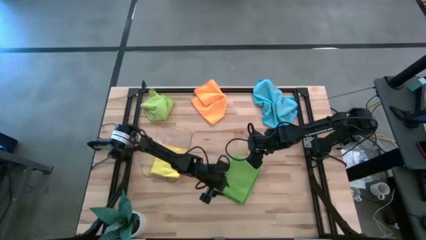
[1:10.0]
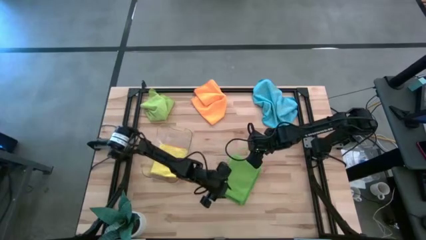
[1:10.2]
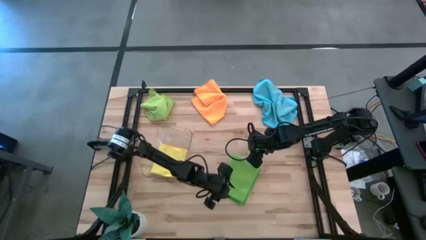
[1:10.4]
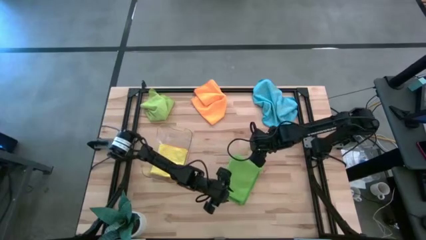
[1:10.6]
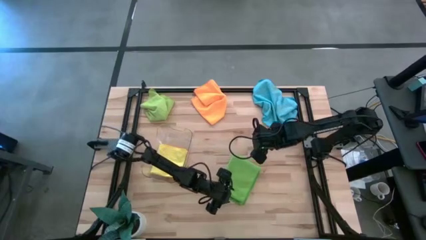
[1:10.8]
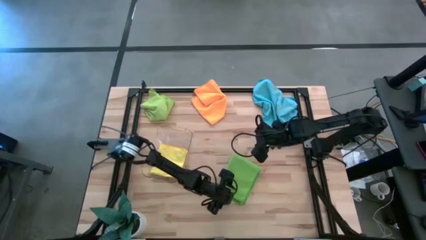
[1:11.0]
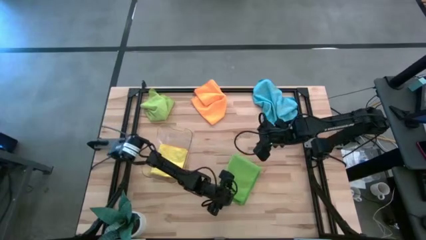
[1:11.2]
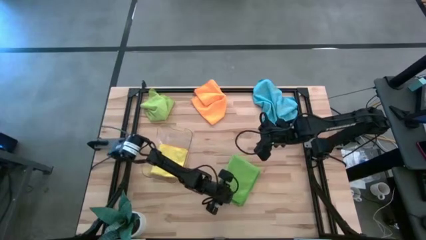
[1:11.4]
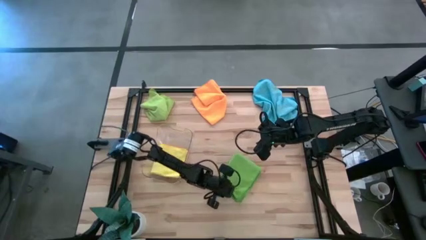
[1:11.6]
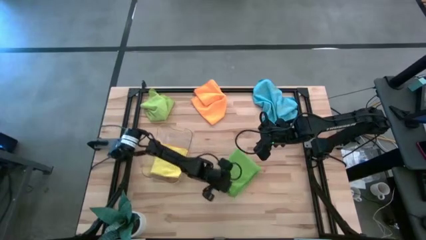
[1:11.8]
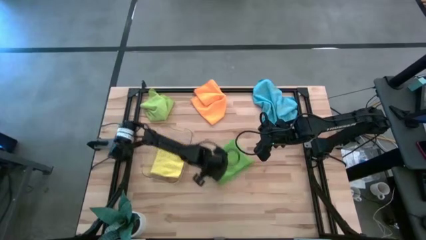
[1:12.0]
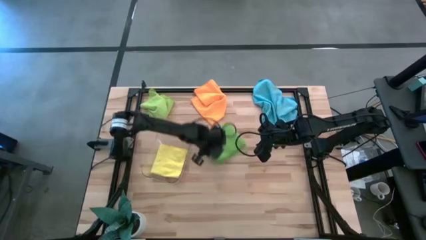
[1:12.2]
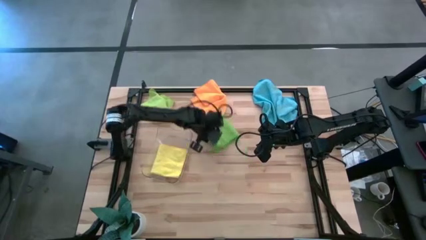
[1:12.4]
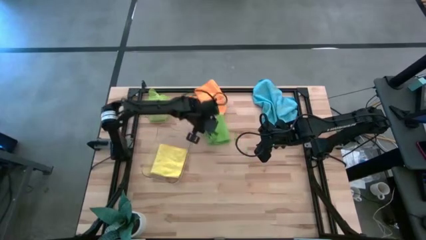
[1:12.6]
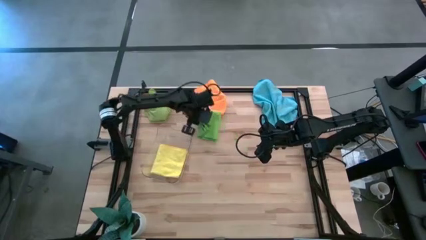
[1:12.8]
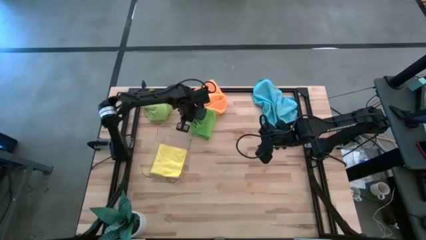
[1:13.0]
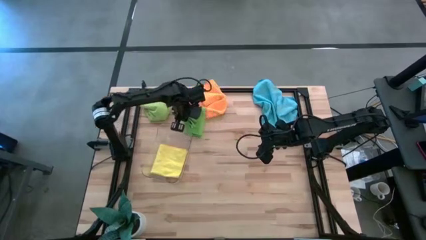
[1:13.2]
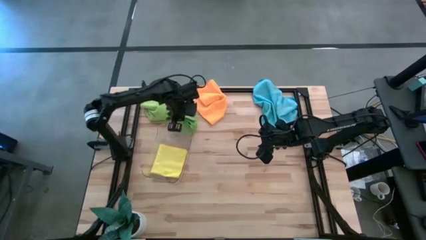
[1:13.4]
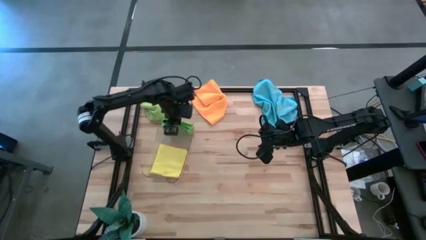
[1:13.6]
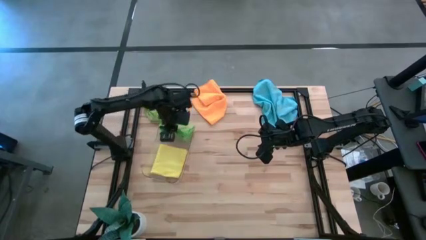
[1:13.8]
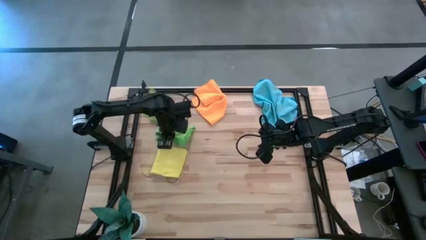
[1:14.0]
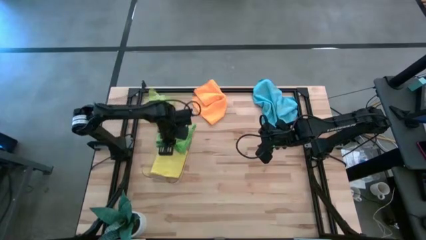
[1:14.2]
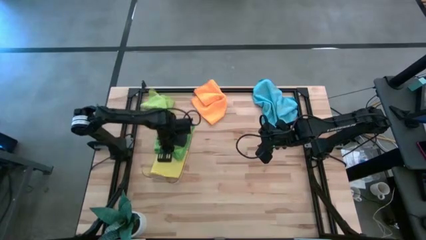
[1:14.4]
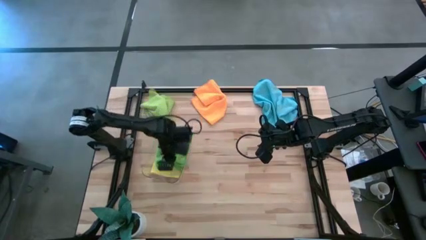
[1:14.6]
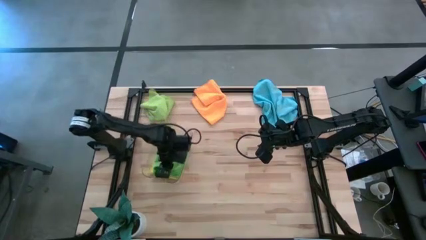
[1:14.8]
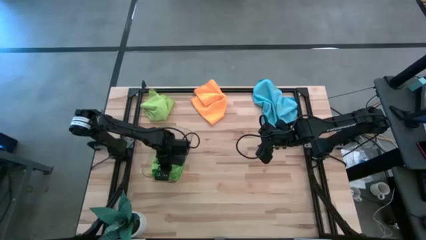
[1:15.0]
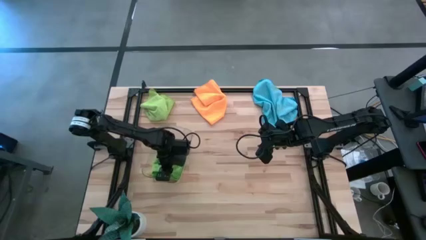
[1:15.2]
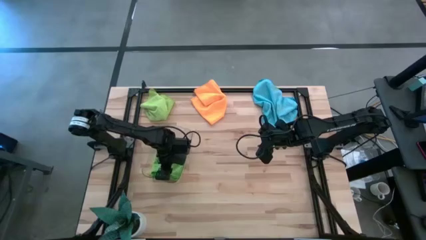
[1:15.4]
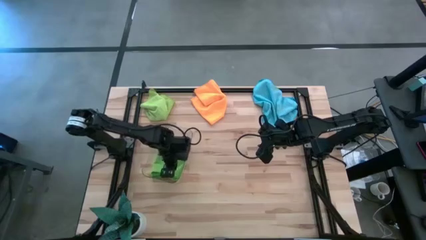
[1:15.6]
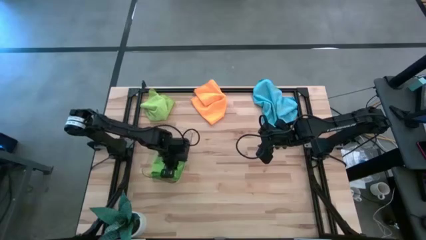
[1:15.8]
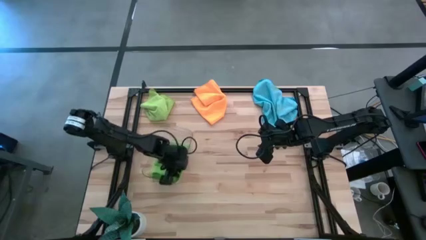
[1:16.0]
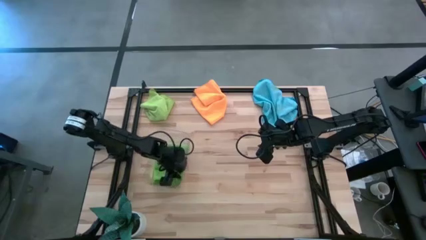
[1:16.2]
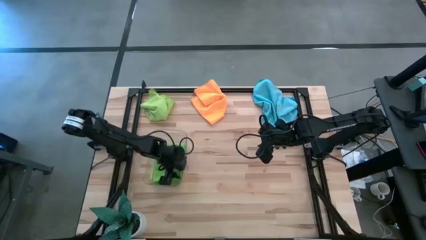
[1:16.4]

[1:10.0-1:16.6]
Task: Fold microfiber towels
Put the folded green microfiber towel into the transparent bin

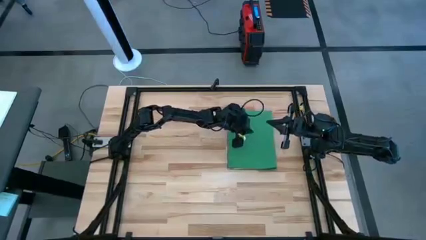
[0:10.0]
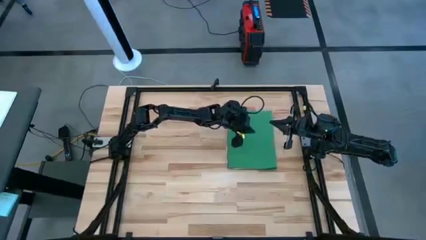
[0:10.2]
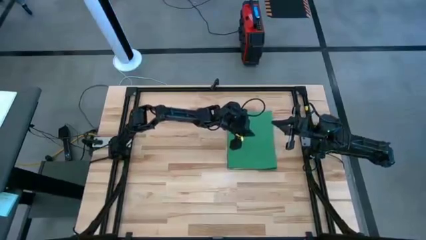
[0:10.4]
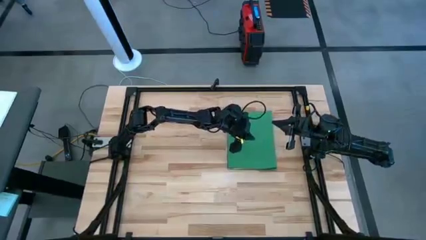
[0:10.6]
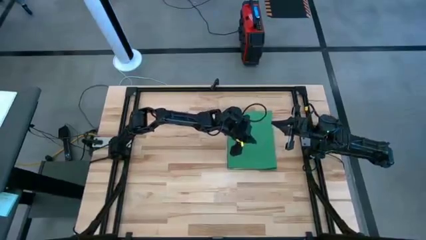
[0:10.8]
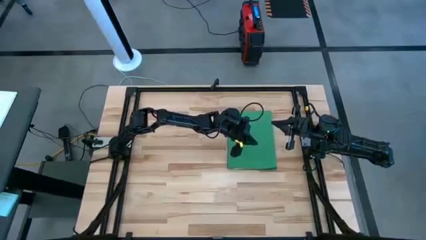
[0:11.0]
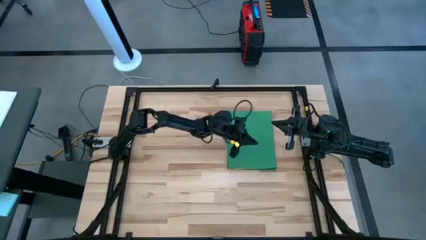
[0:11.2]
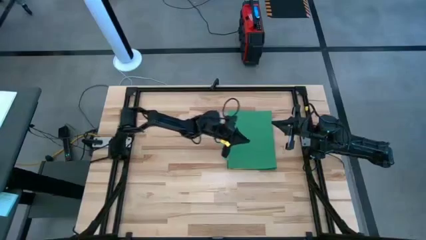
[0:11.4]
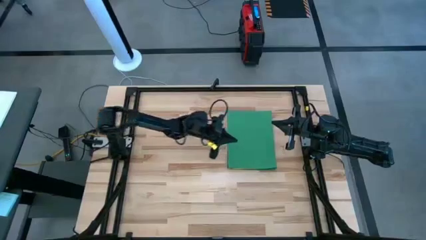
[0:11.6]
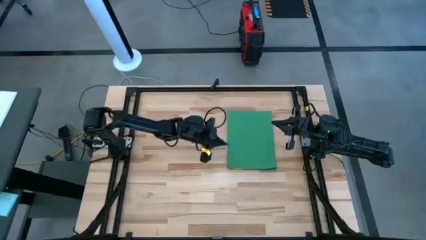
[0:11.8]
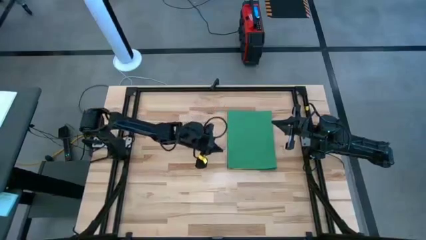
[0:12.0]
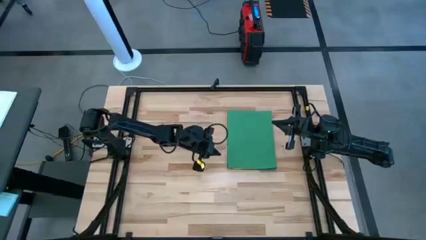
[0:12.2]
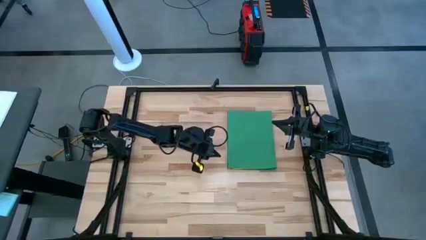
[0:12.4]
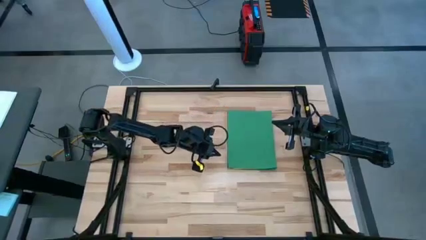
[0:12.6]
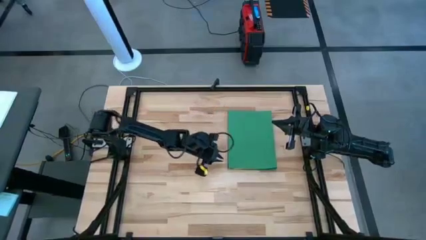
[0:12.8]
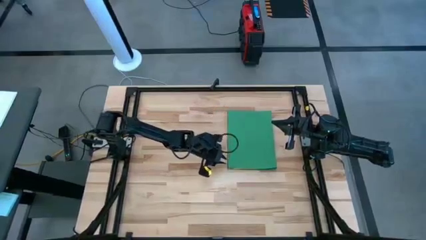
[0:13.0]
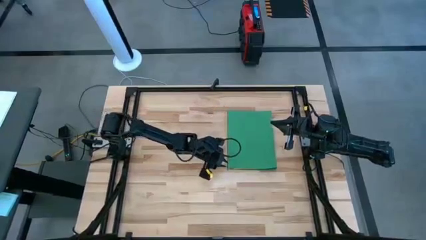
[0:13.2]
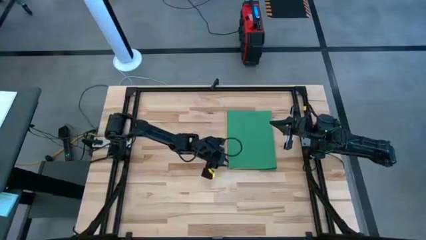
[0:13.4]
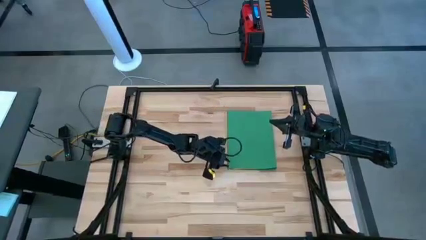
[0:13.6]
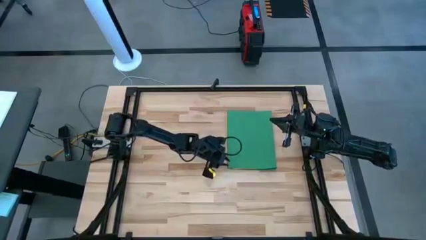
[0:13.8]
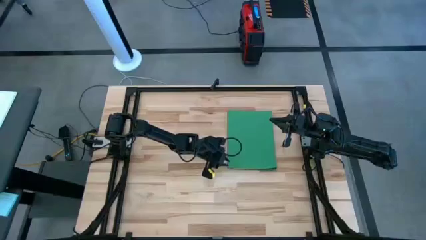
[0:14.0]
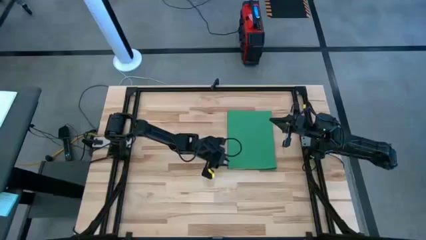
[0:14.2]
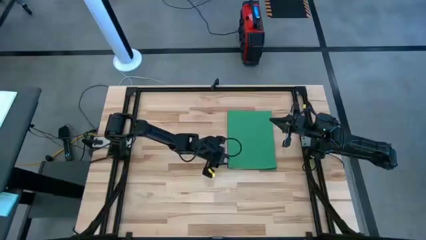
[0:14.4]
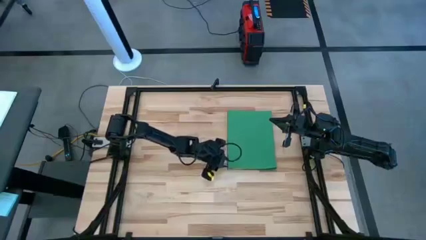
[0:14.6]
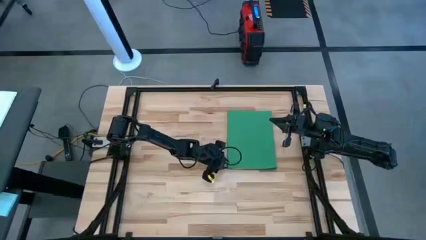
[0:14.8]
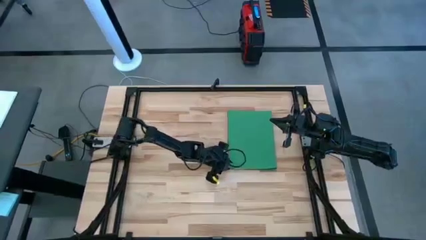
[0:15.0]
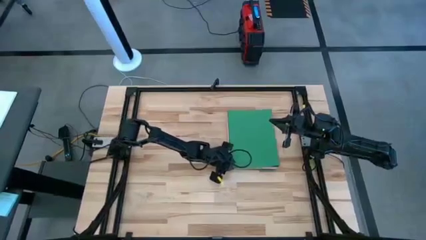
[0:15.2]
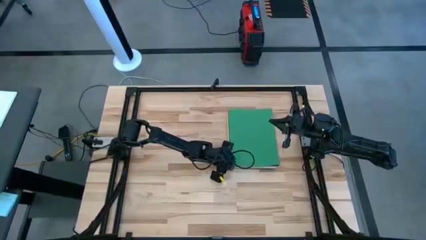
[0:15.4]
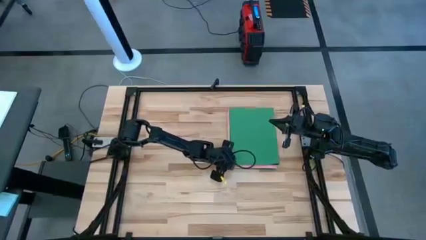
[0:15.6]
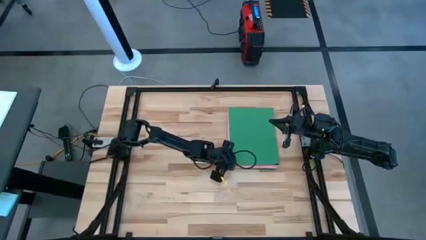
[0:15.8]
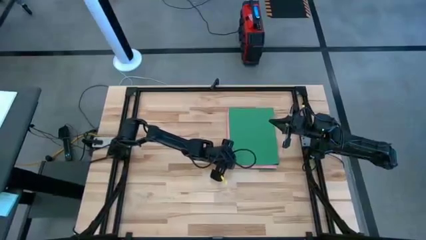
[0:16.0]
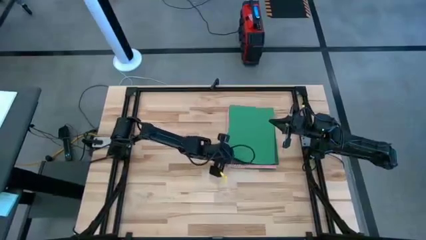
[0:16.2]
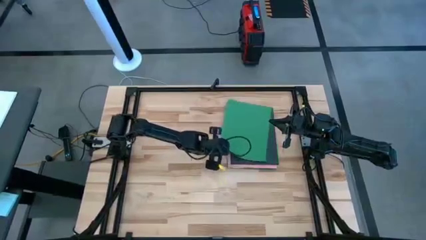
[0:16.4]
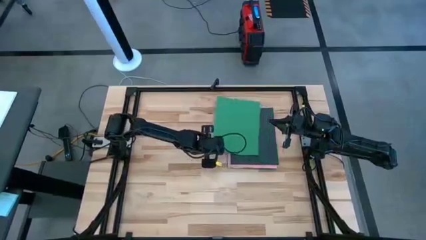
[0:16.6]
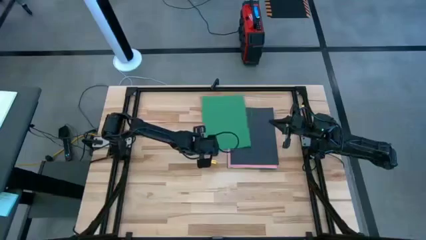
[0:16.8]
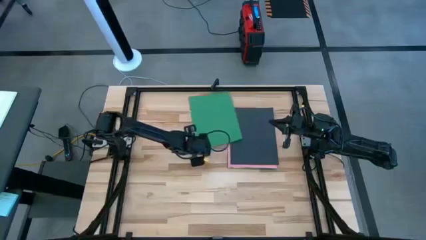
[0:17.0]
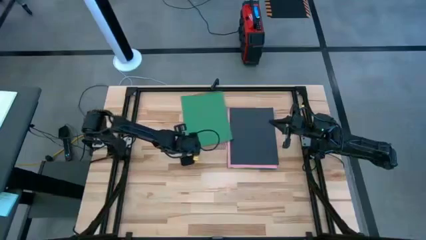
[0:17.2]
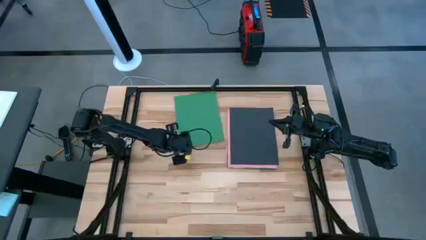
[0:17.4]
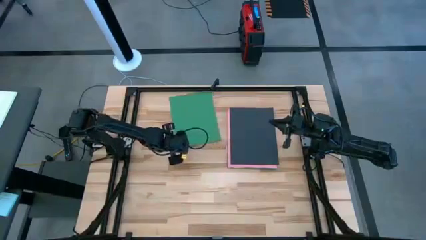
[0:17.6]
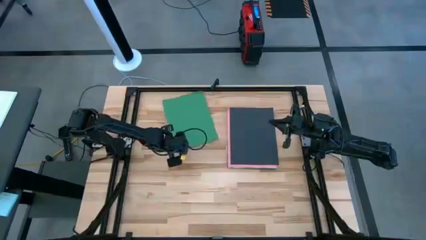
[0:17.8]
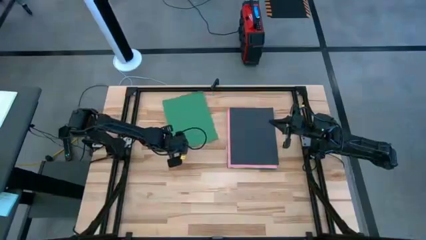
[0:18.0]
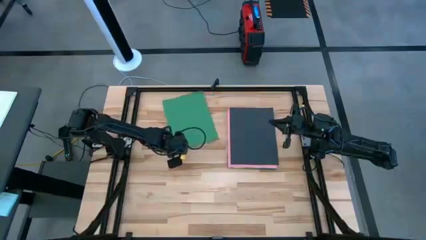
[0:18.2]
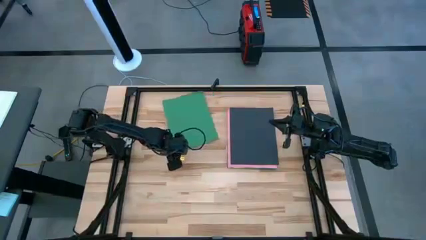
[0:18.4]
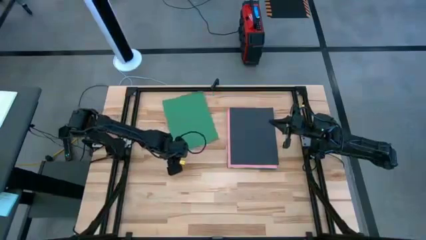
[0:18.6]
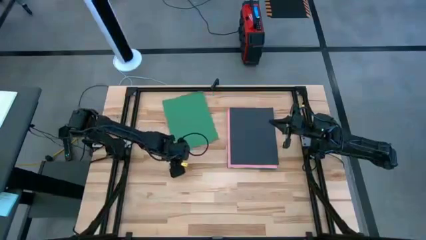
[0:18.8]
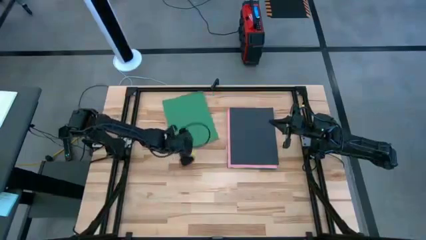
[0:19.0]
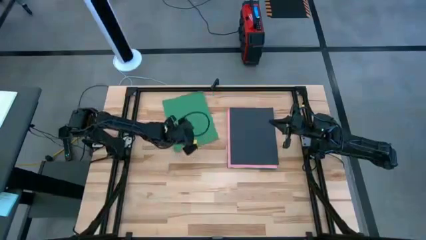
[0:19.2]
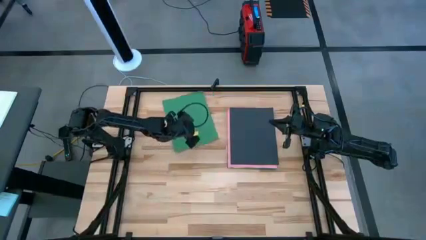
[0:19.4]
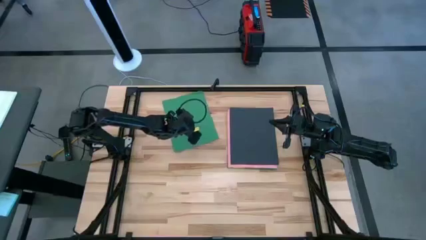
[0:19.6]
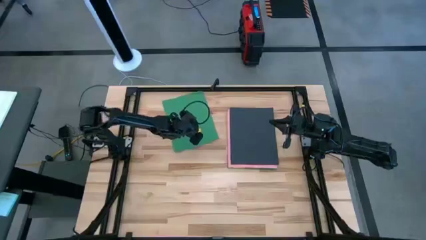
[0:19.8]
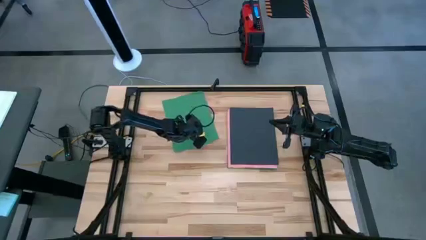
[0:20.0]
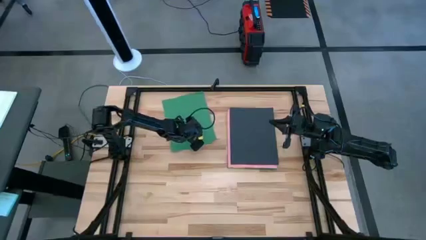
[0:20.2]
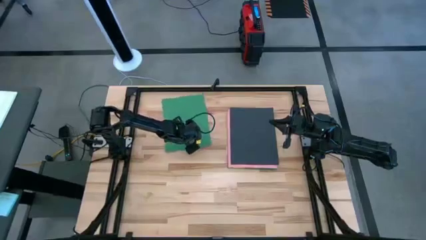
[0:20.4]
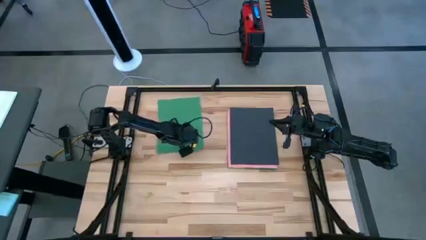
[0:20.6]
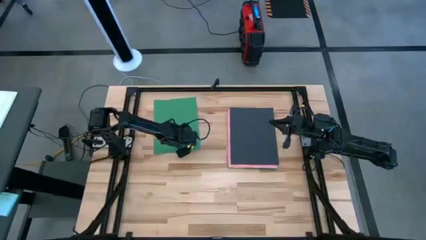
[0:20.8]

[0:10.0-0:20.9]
Task: Organize paper
Move the green paper to the top left of the table
